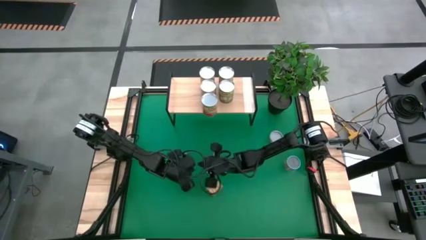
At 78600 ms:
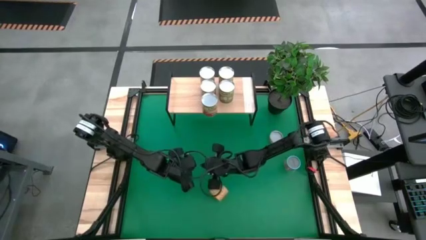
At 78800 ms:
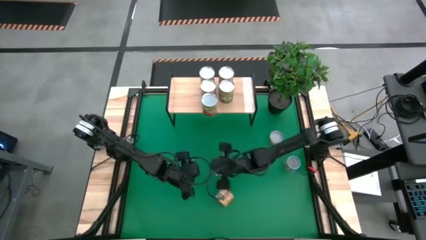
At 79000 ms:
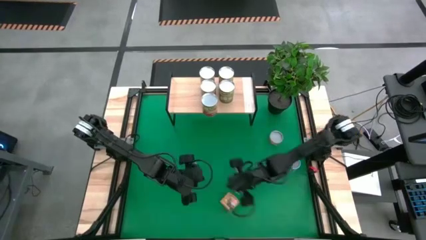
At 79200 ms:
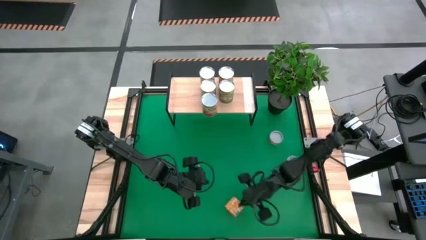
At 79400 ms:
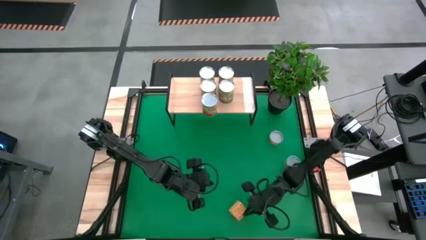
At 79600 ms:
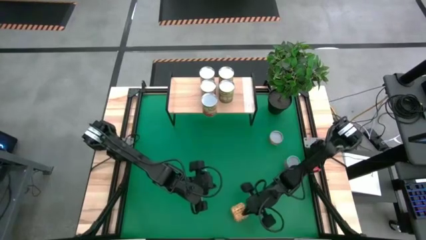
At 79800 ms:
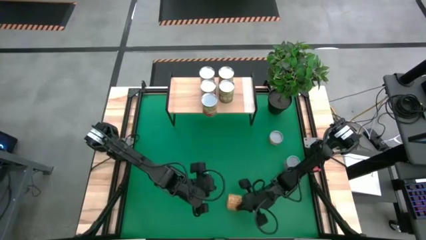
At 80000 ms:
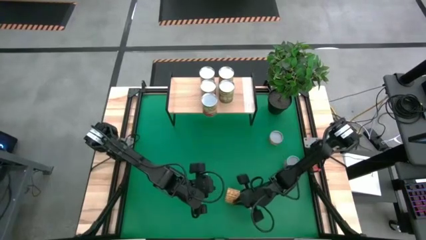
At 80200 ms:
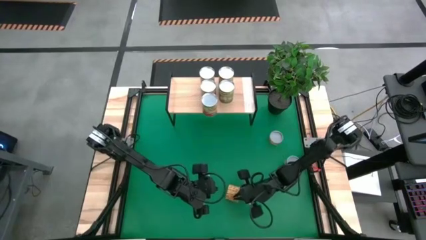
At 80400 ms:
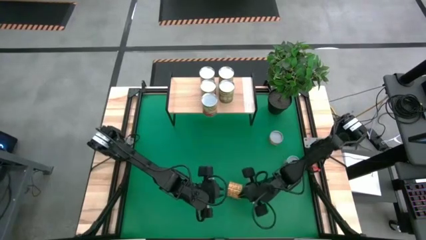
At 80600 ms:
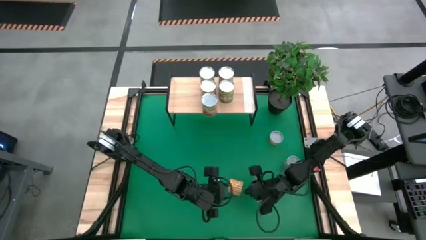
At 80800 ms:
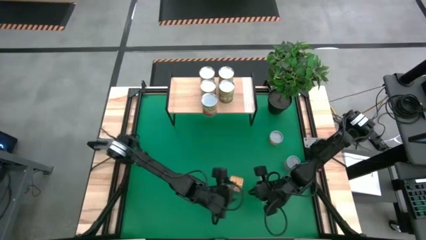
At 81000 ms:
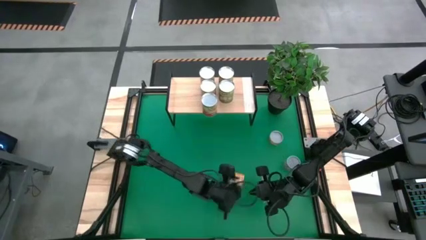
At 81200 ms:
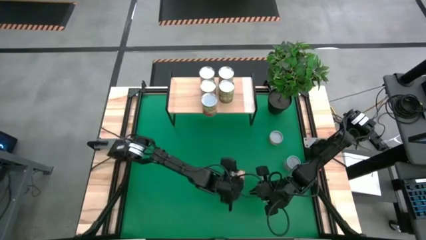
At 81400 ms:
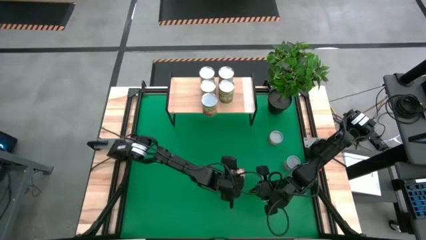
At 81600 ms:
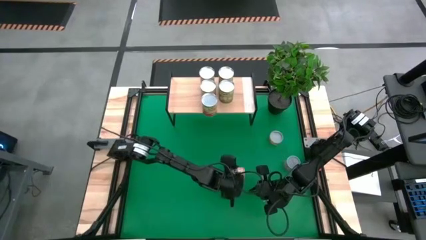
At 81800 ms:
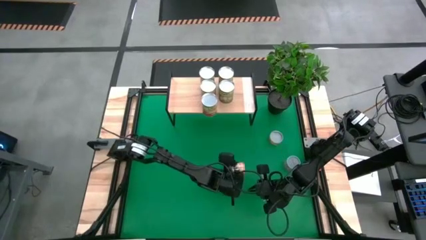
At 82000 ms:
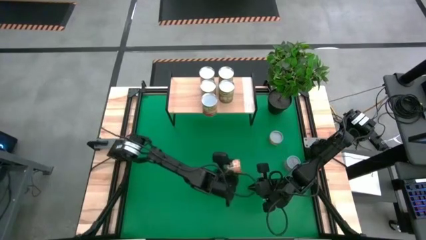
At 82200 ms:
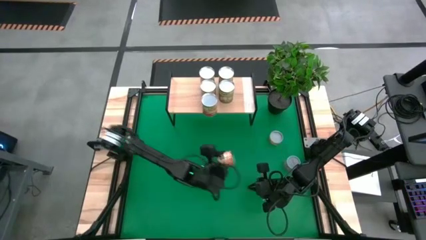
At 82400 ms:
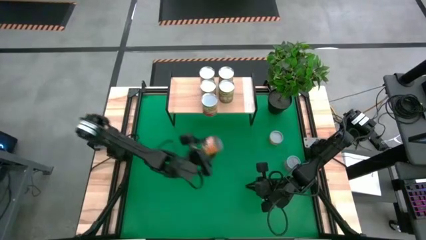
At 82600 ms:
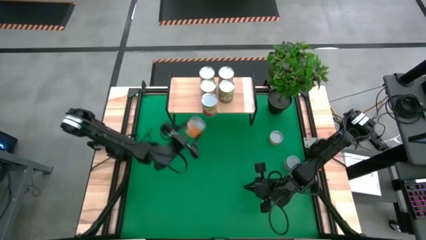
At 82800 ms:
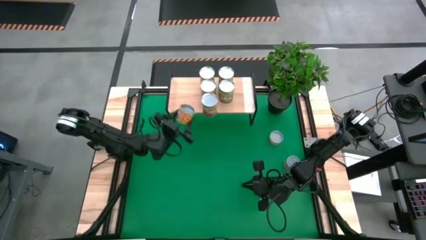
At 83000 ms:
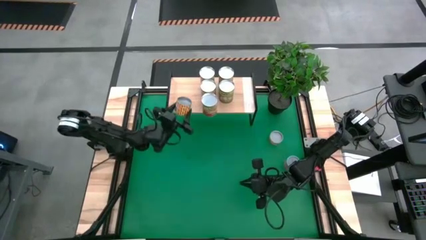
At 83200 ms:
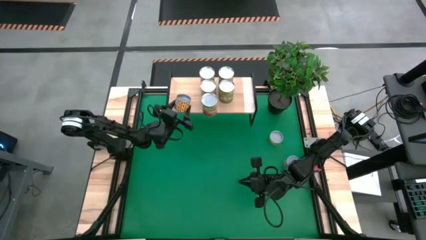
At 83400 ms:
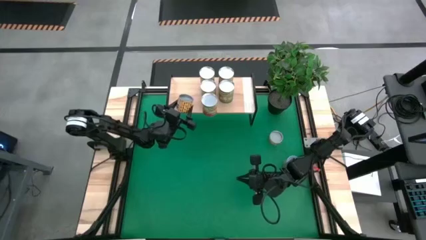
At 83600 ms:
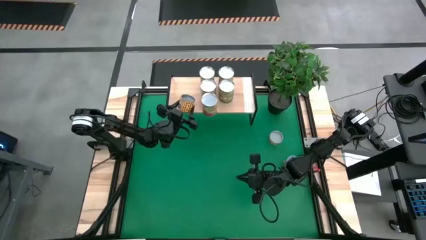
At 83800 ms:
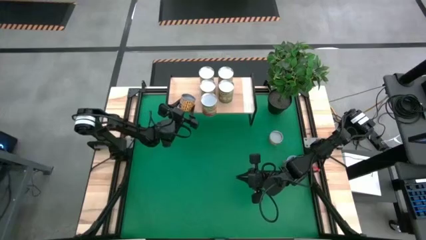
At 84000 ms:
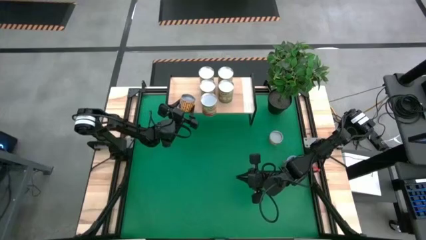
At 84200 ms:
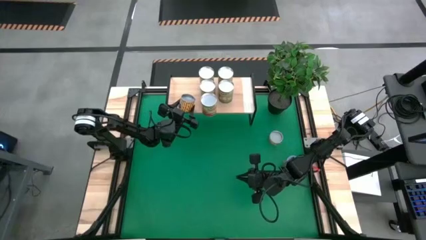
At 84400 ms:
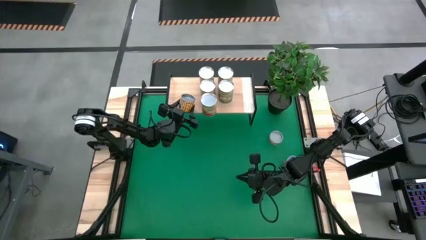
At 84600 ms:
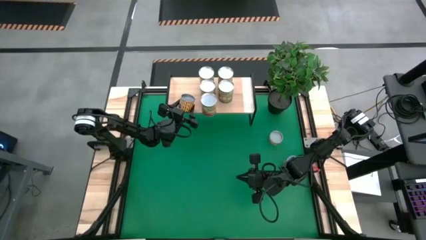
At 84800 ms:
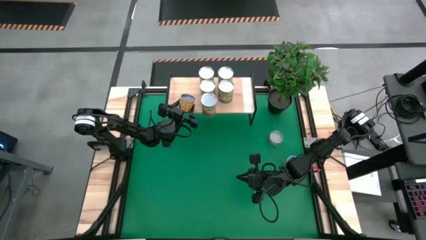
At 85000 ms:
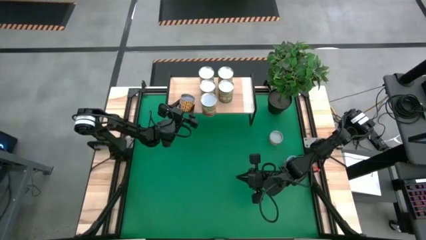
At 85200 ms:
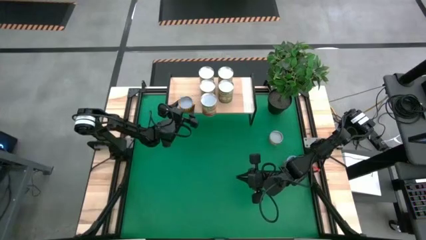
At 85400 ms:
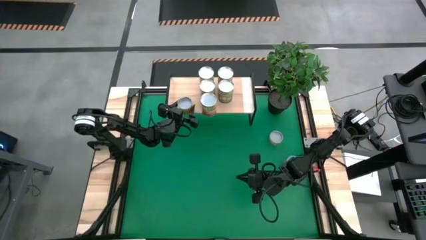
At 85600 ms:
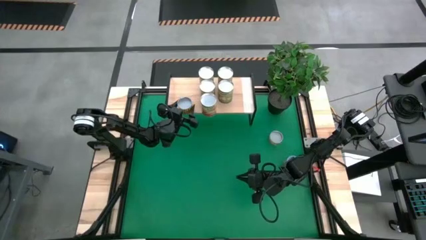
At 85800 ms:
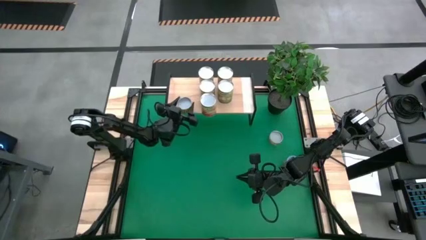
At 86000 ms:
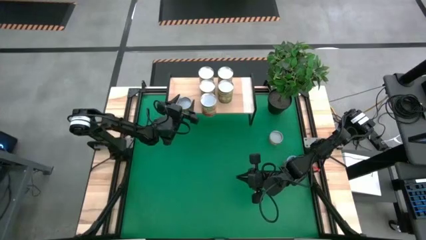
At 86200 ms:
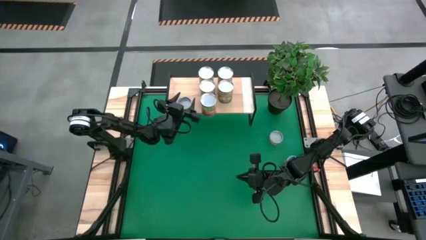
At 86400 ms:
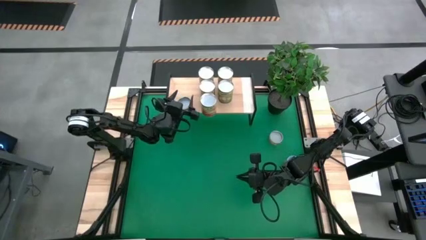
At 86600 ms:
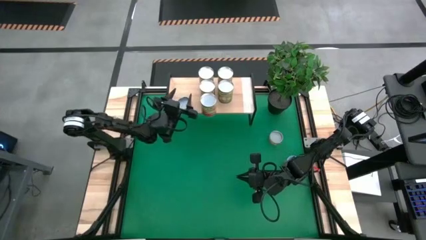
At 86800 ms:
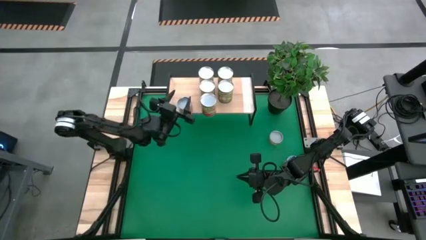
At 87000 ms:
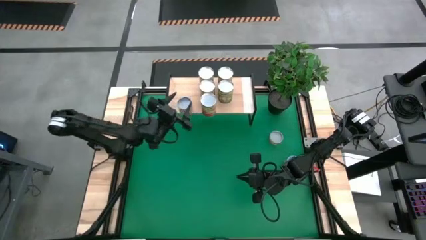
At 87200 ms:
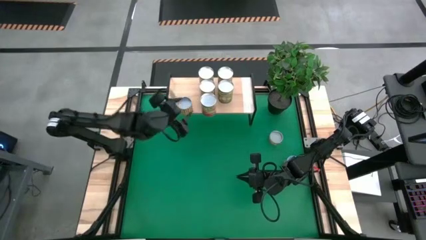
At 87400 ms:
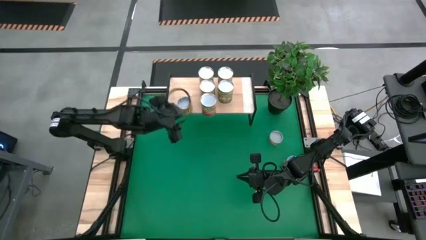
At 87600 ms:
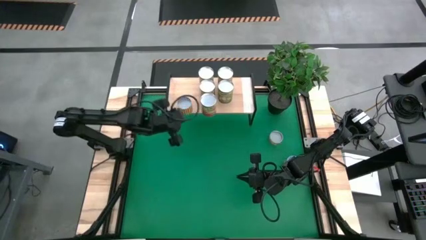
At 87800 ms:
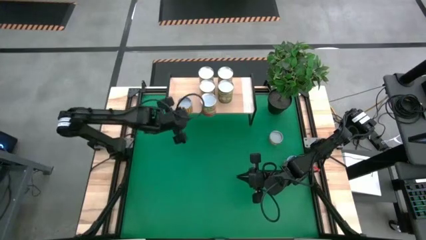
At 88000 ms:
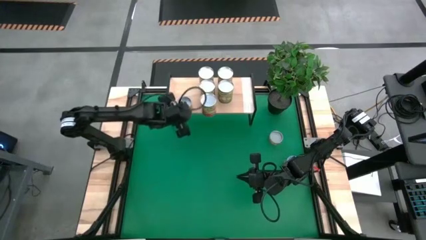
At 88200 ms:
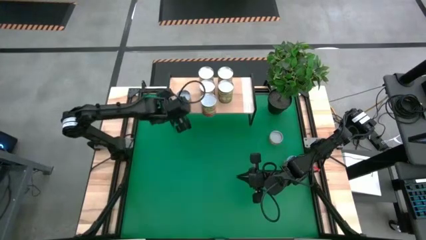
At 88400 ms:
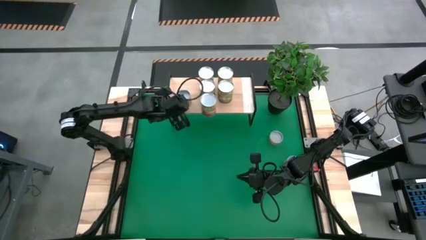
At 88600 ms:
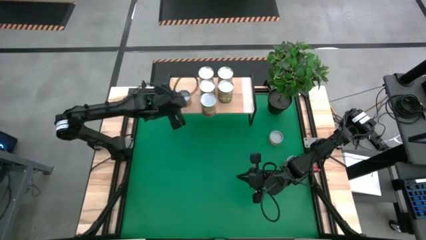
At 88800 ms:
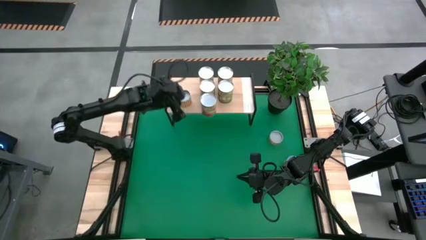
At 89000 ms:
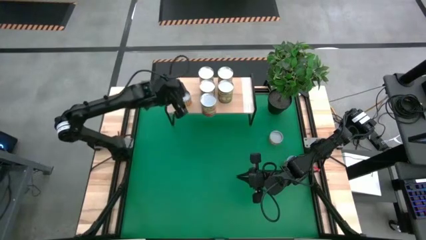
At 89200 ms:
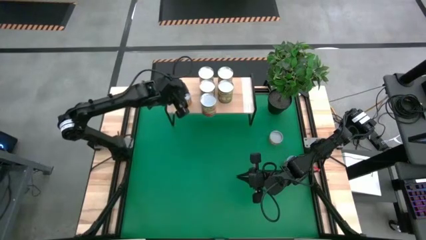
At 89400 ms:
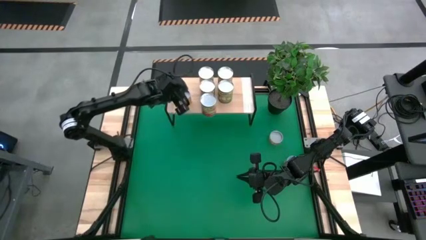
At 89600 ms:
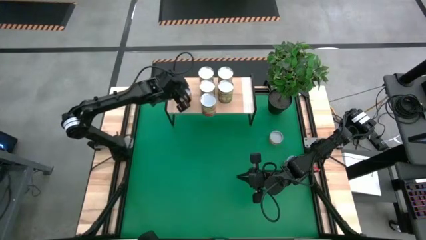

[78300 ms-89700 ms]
Task: Pick and place cans onto a shelf
Put the canned black beans on the shelf
